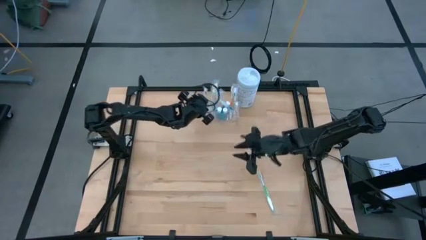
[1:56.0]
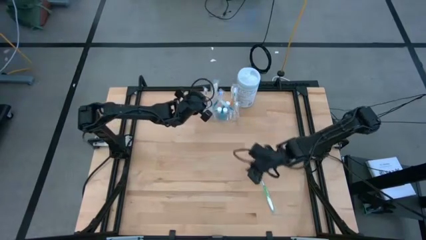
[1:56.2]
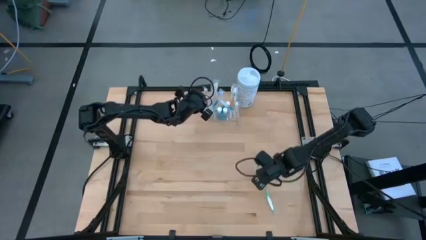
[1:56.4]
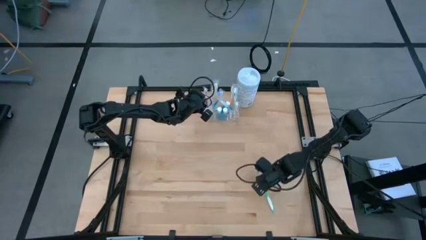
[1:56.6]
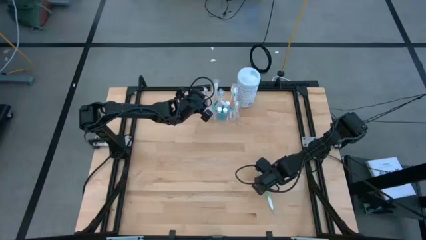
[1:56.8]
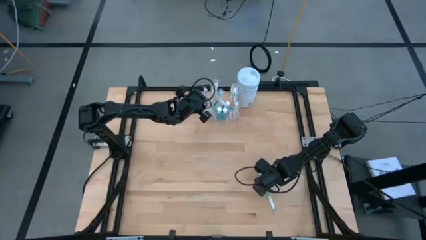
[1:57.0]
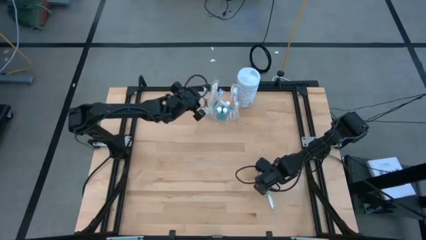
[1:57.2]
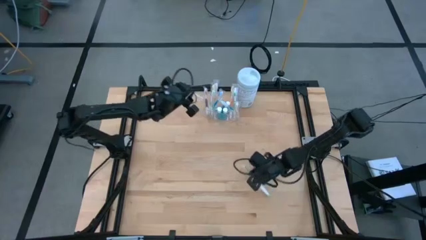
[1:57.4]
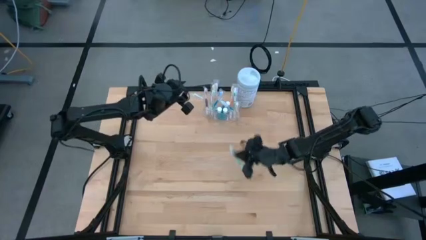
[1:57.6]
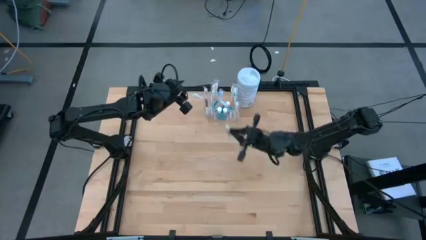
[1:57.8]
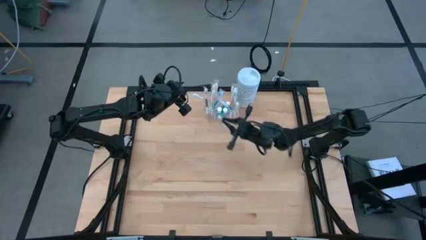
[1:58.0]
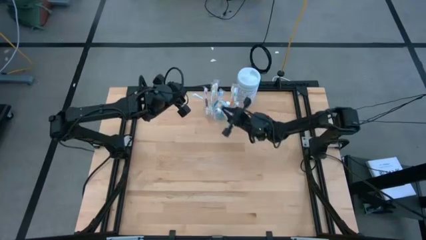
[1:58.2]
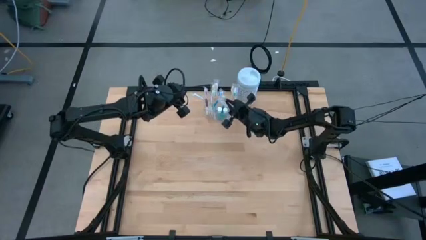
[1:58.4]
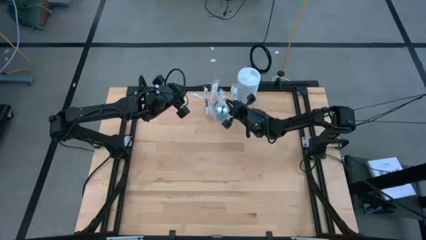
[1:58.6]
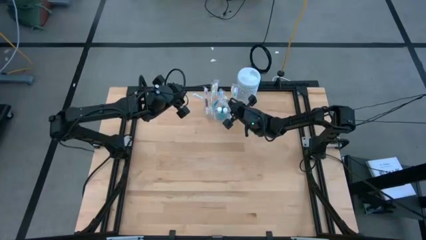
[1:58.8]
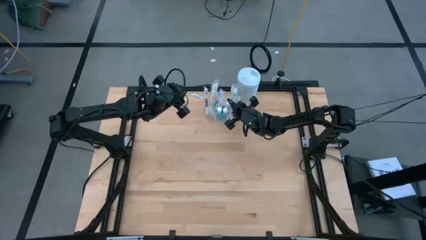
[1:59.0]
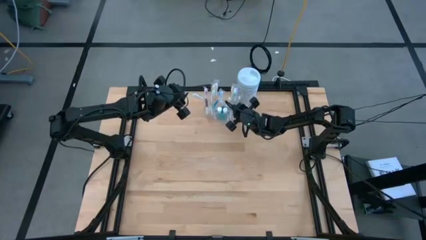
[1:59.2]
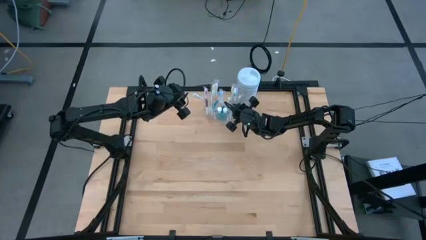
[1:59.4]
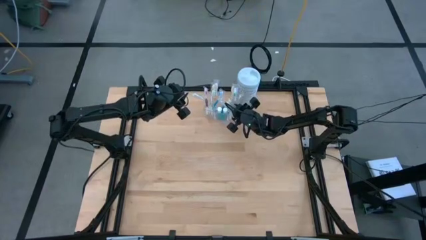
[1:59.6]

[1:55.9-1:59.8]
Task: Pick & Place toothbrushing station
Put the green toothbrush into the transparent organizer

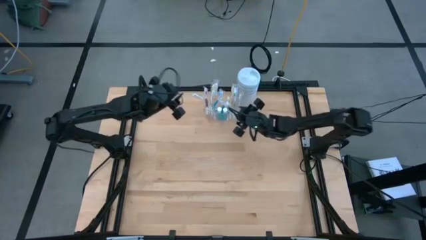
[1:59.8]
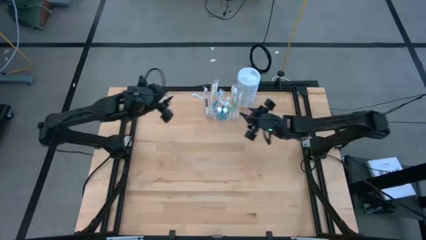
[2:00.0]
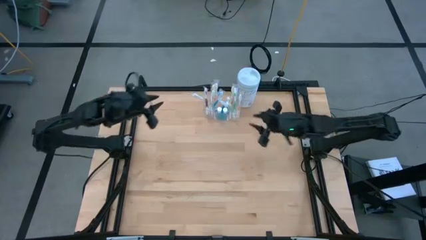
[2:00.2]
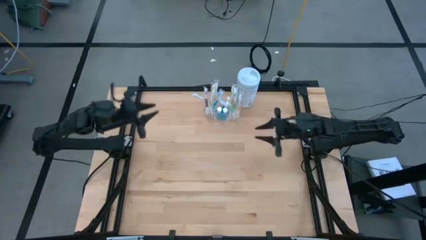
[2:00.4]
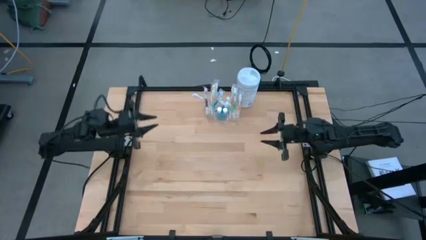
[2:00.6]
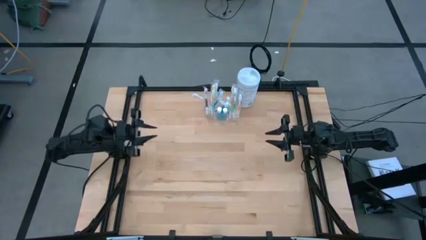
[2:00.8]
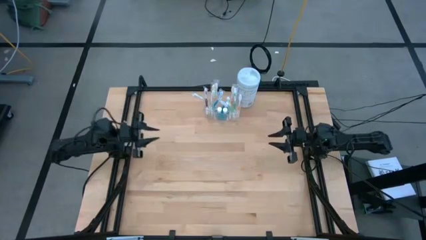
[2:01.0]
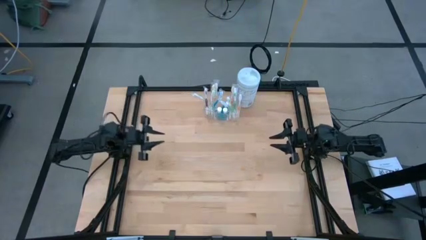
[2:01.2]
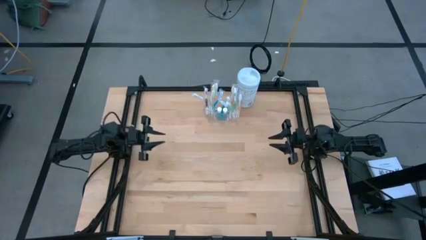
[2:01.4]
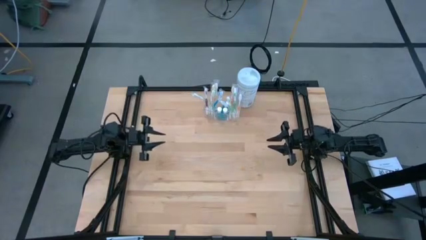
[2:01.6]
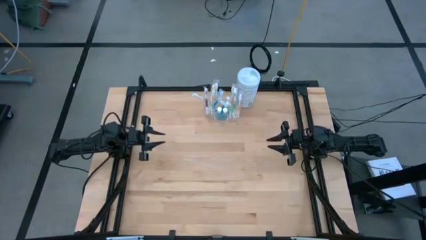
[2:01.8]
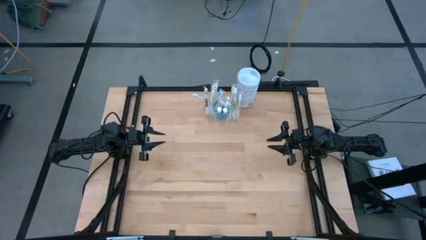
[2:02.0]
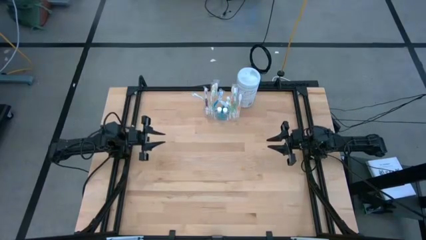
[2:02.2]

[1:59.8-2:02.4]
Return to Home Position

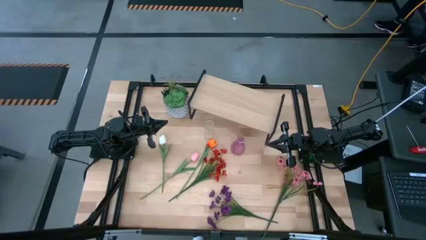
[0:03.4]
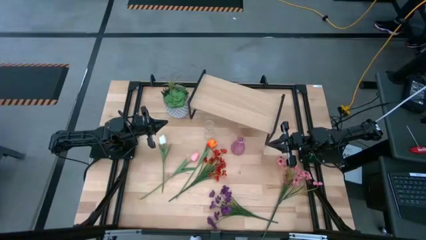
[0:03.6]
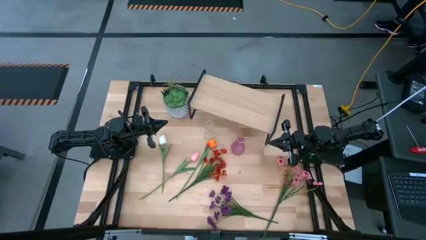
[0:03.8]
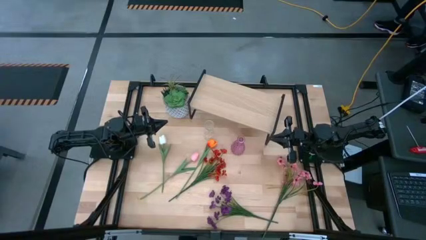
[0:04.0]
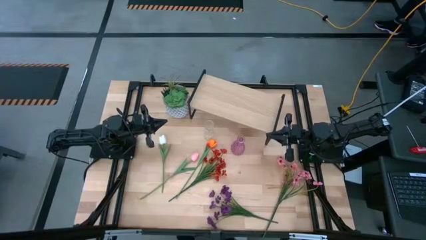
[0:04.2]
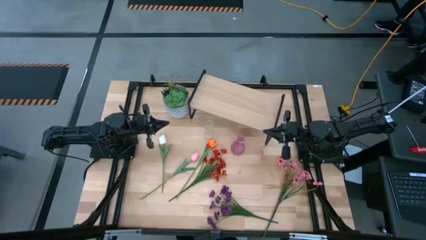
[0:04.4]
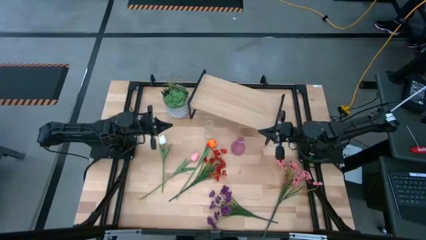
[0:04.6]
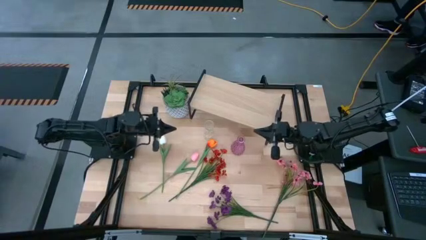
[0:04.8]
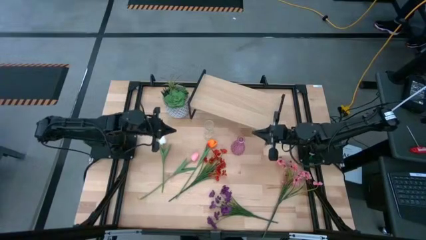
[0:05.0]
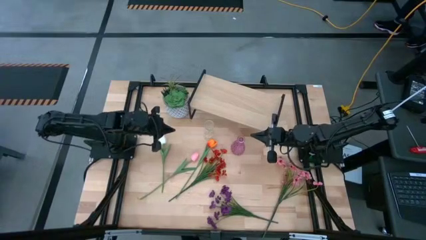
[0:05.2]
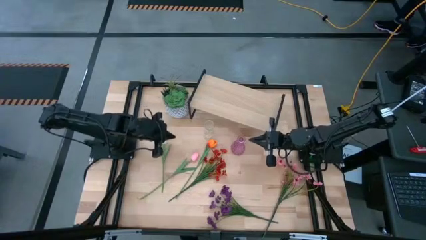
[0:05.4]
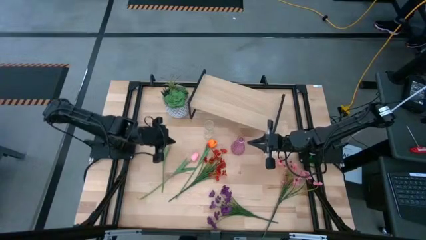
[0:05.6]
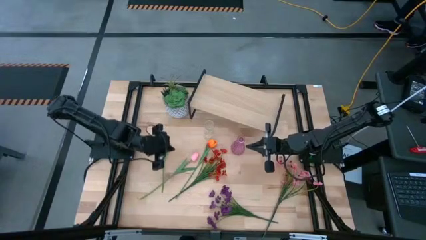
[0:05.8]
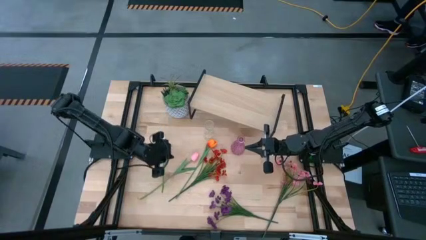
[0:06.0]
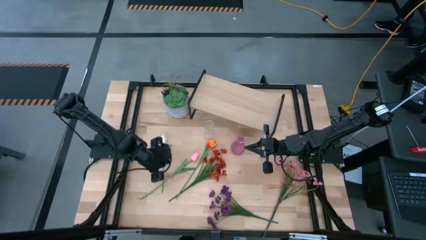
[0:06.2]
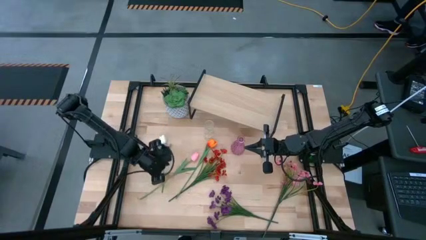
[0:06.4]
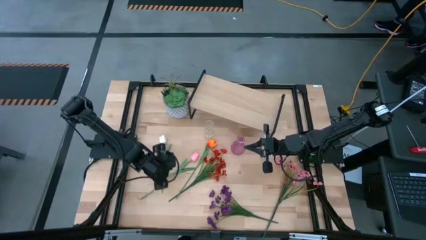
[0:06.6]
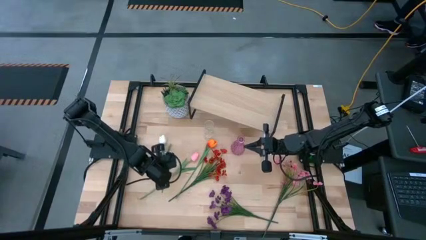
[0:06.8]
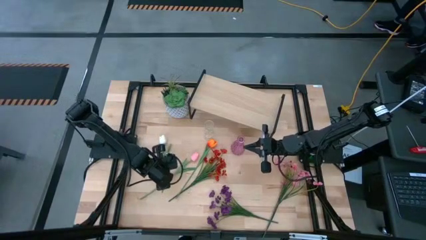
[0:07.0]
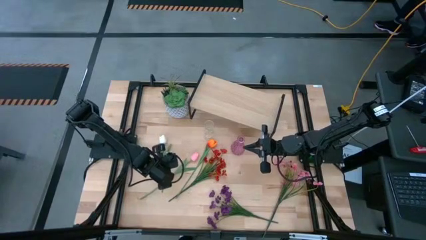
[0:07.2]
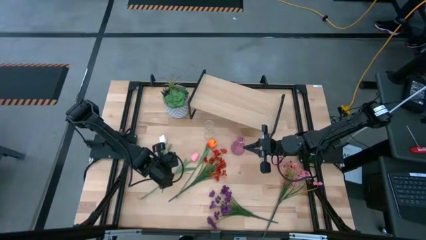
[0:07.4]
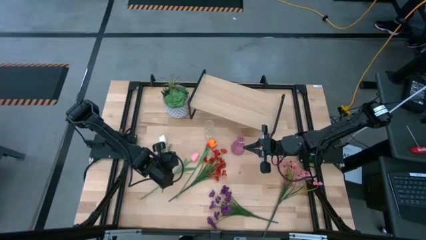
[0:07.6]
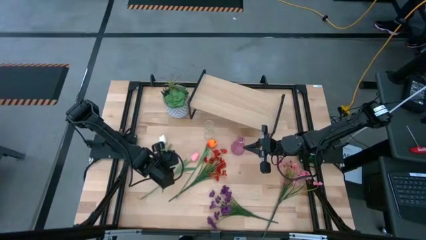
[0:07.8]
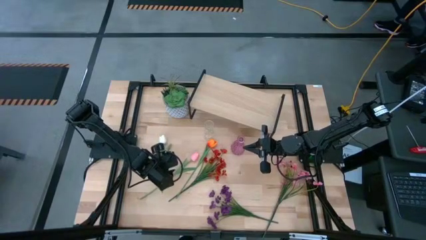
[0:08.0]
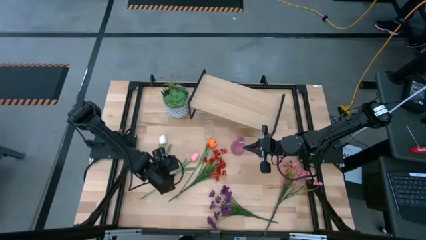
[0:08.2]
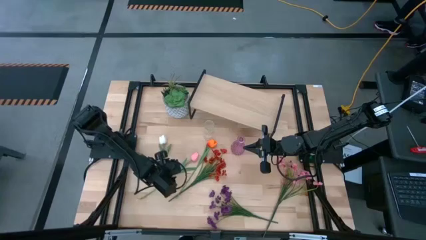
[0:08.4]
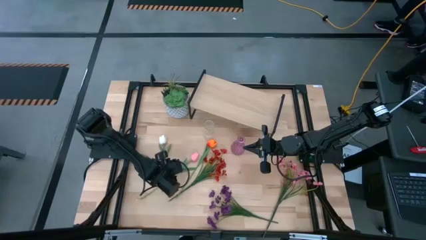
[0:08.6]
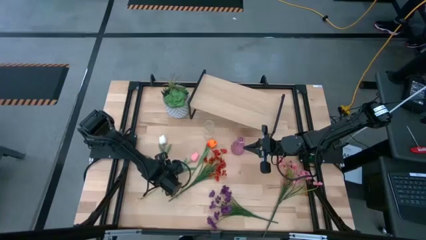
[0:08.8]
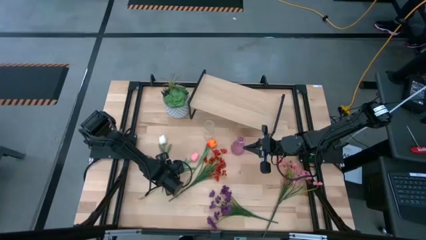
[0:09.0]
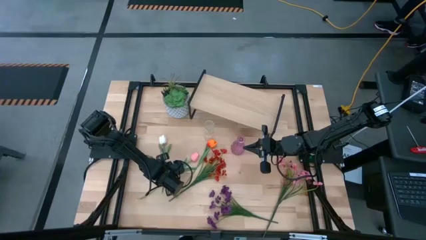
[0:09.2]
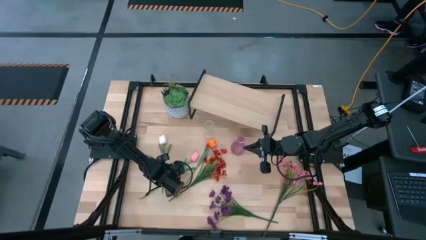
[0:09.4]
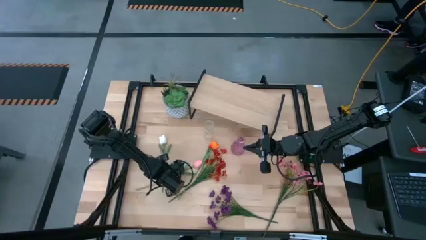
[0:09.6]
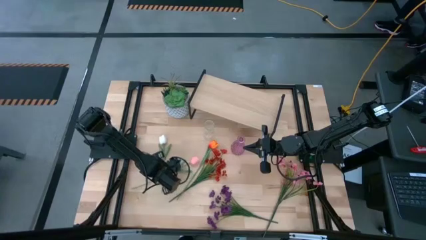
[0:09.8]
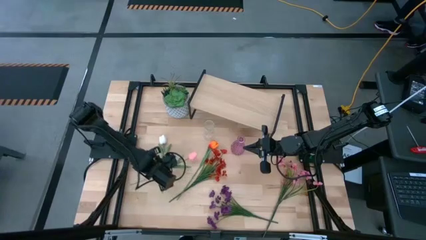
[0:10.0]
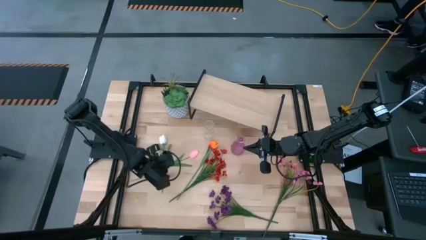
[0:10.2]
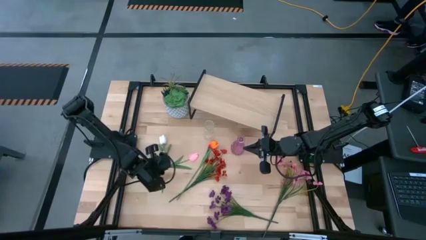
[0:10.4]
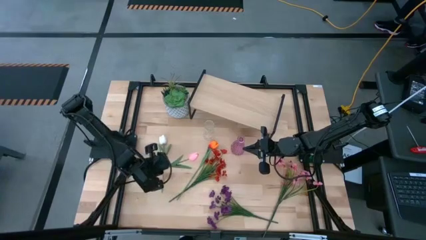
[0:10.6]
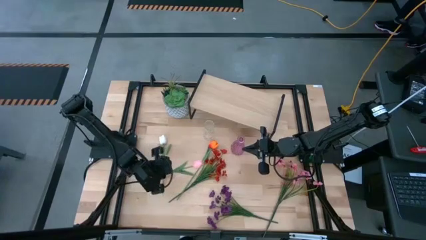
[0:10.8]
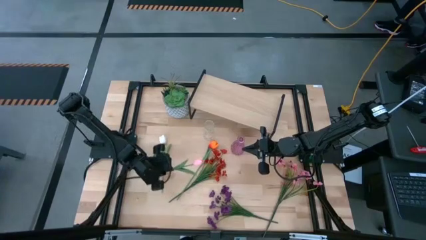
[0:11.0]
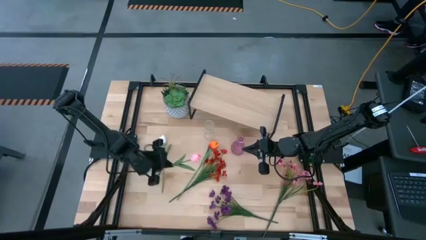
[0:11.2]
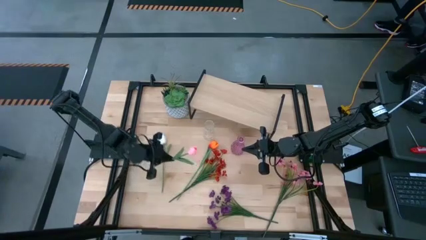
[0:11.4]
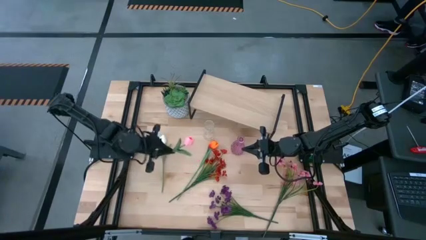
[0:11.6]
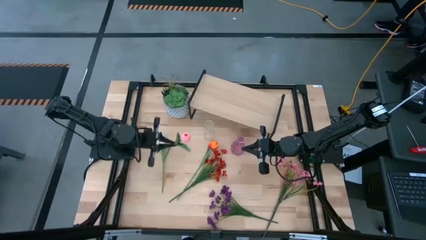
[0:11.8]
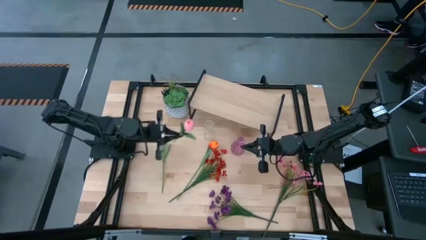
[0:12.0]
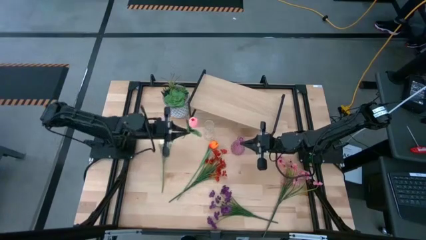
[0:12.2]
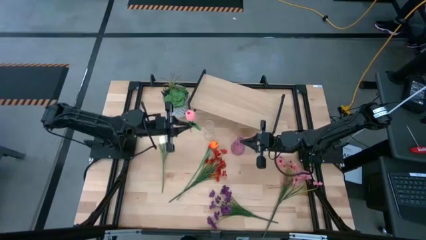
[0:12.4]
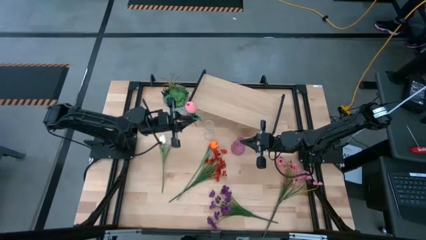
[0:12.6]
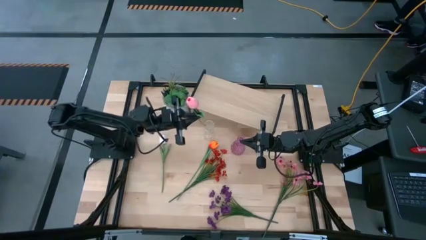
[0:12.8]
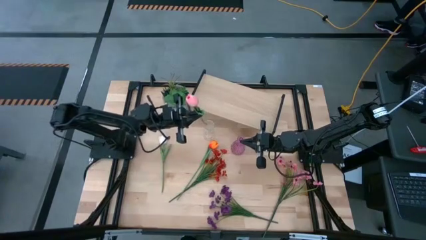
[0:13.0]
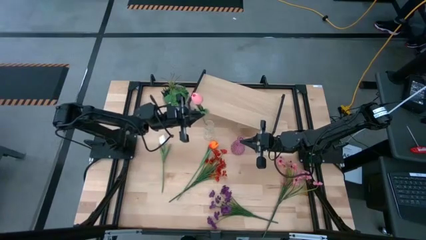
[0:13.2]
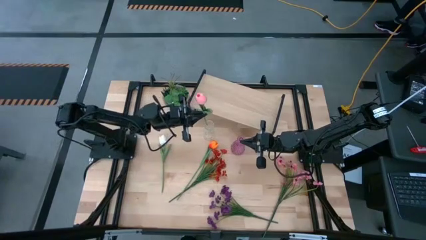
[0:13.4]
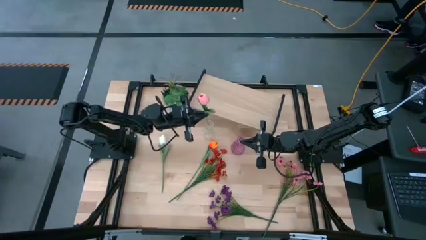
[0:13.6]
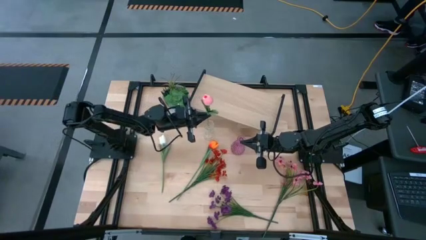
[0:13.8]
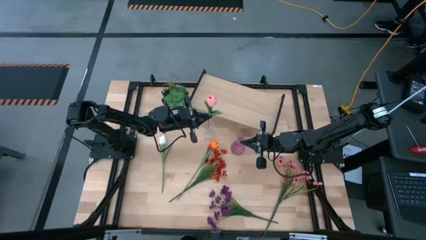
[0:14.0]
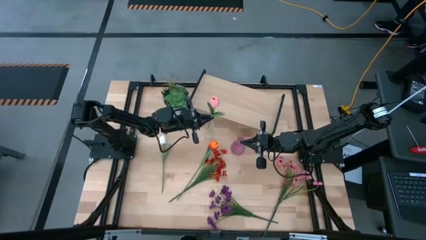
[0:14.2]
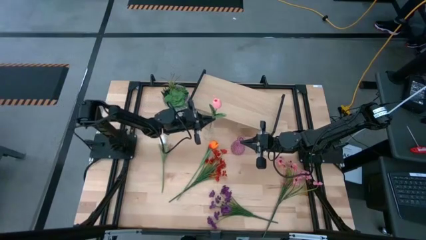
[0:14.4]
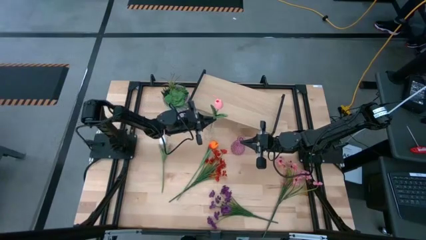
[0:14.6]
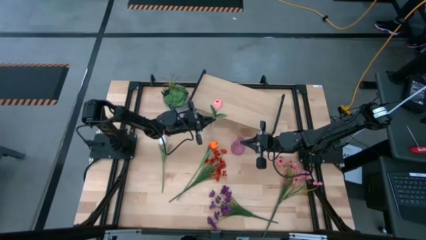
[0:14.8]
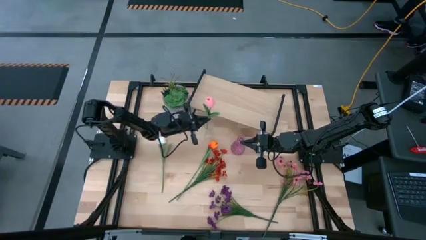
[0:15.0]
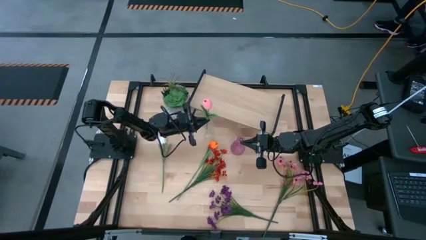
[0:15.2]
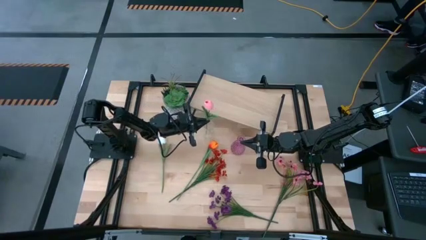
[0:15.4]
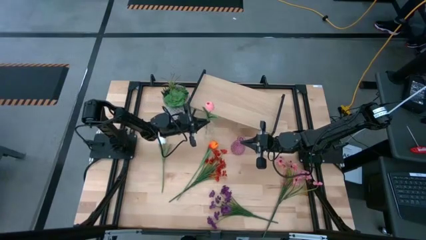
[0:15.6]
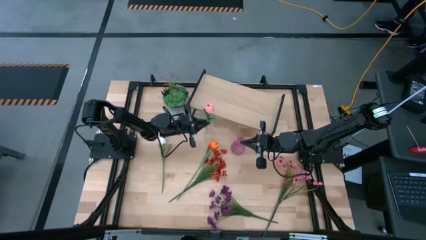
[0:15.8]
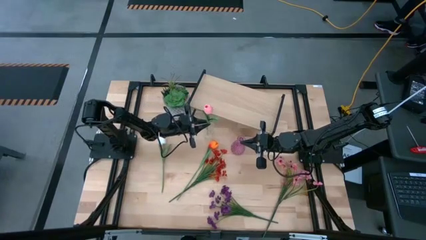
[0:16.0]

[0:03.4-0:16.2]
Task: Pick and place flowers into a vace then onto a shelf
Put the pink tulip into the transparent vase
